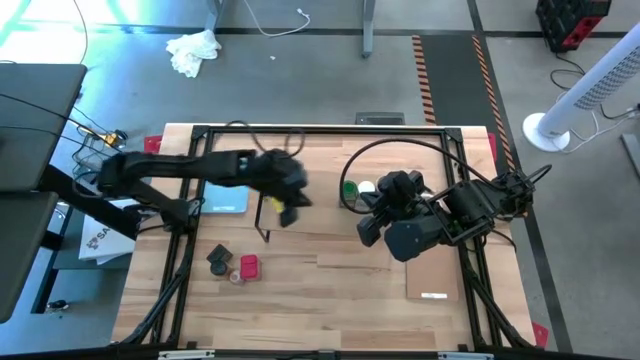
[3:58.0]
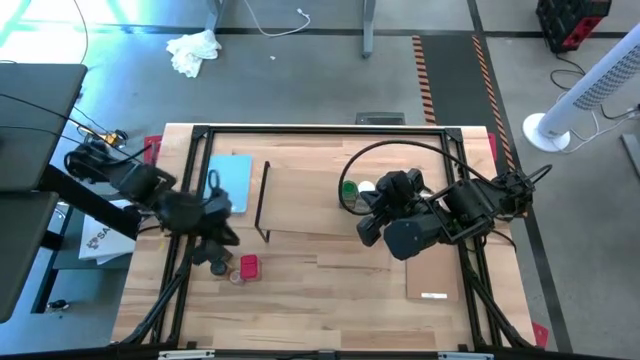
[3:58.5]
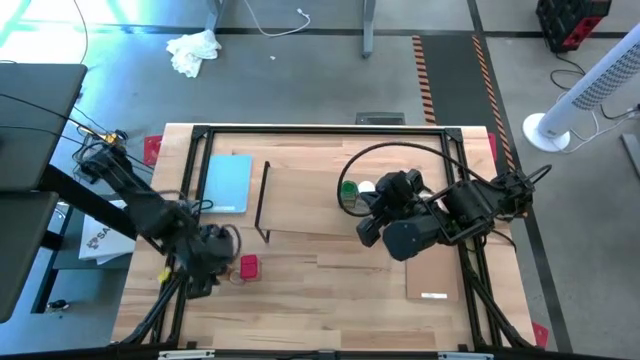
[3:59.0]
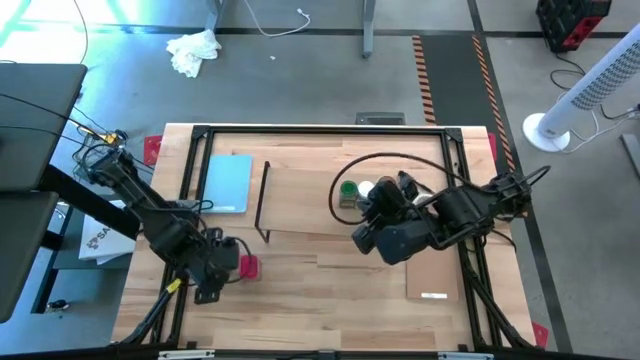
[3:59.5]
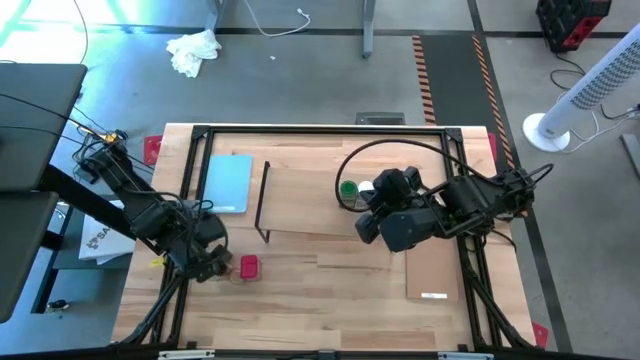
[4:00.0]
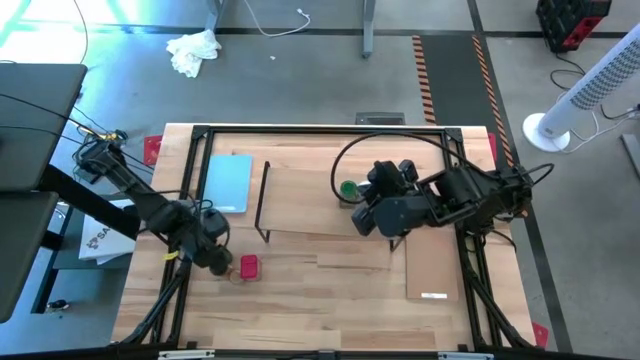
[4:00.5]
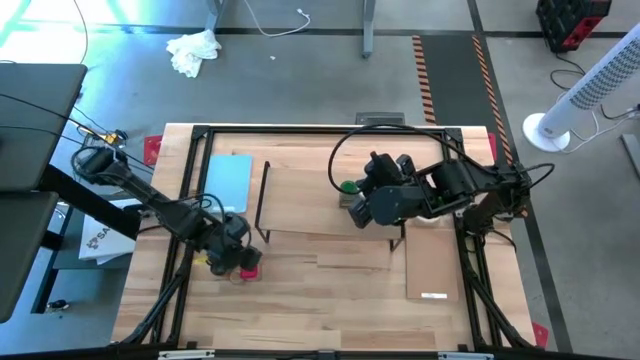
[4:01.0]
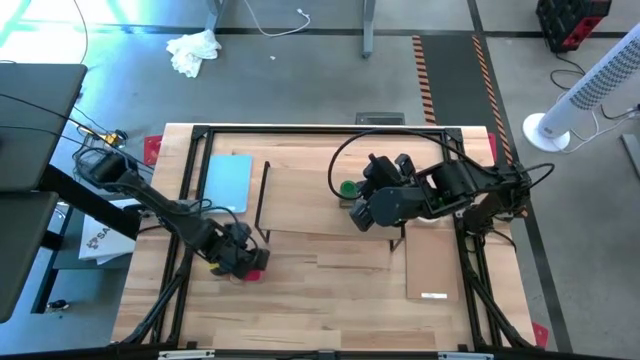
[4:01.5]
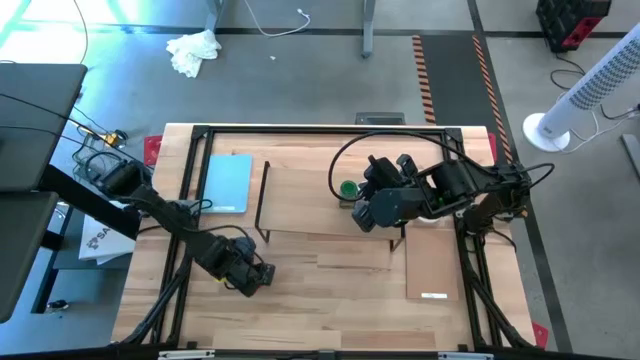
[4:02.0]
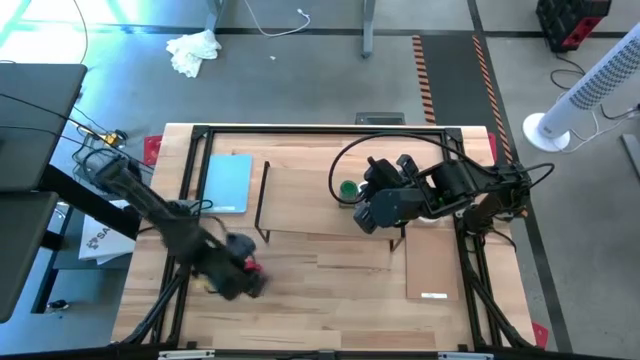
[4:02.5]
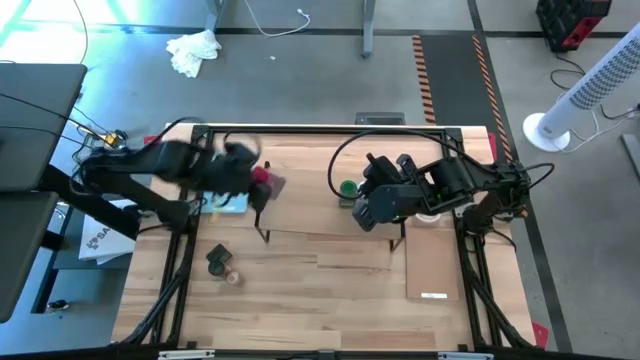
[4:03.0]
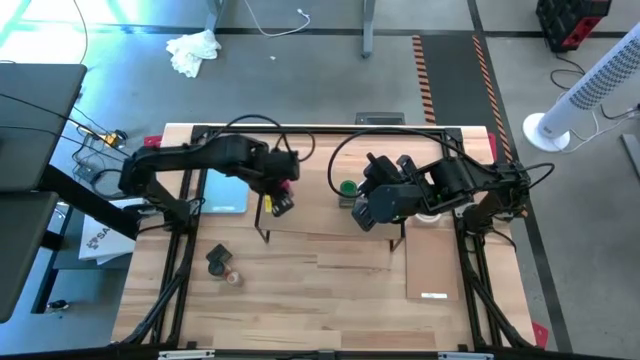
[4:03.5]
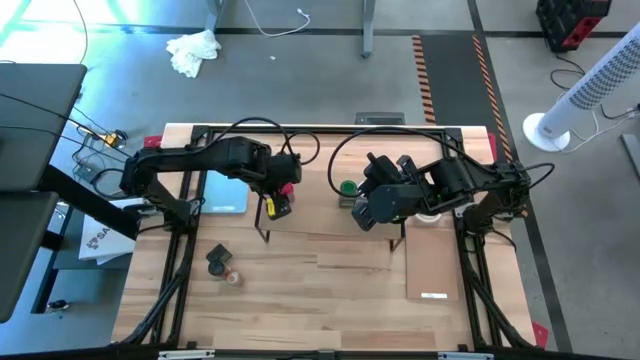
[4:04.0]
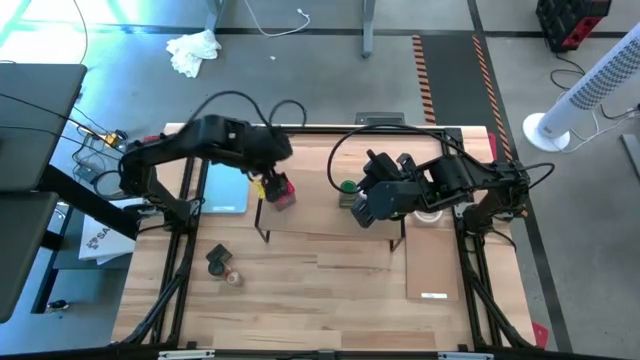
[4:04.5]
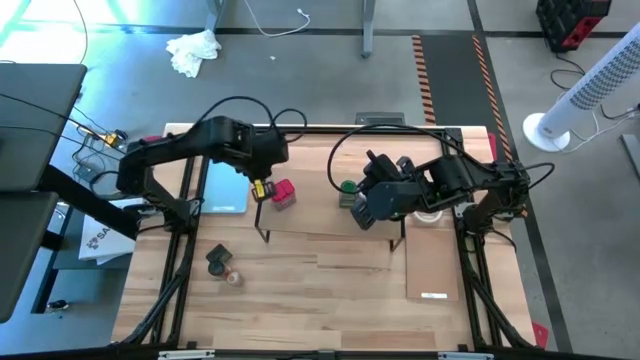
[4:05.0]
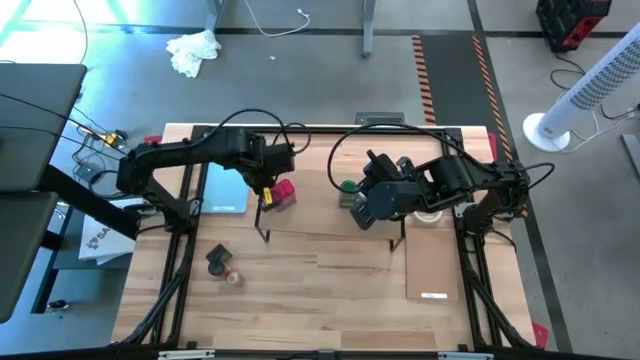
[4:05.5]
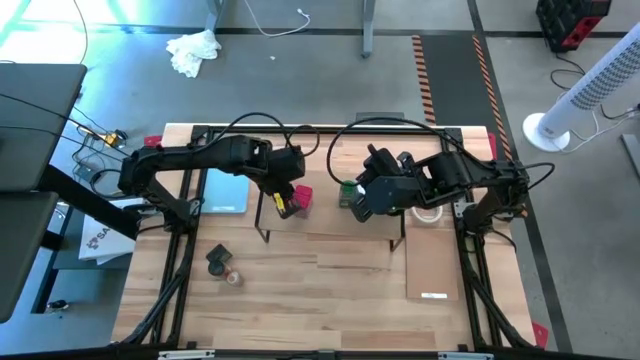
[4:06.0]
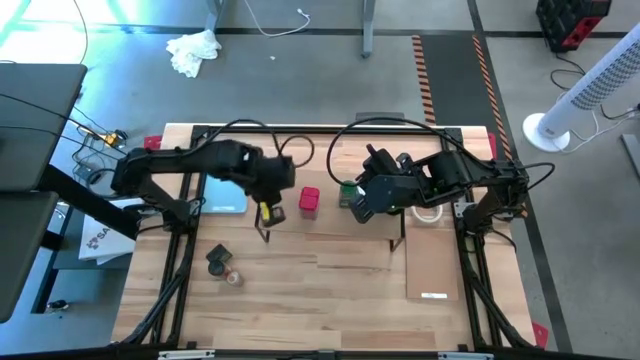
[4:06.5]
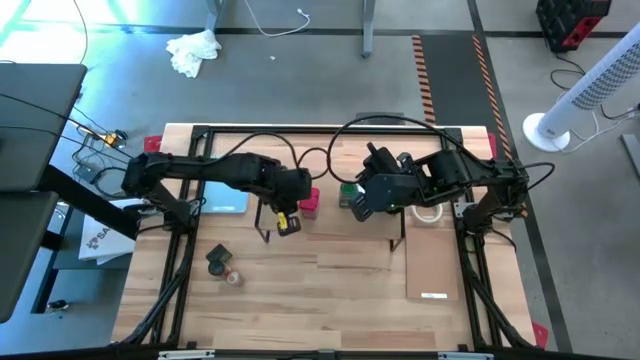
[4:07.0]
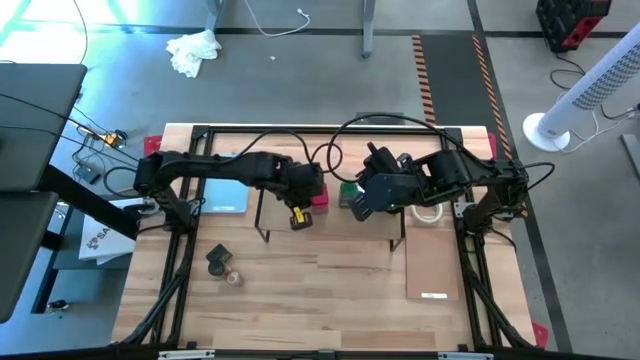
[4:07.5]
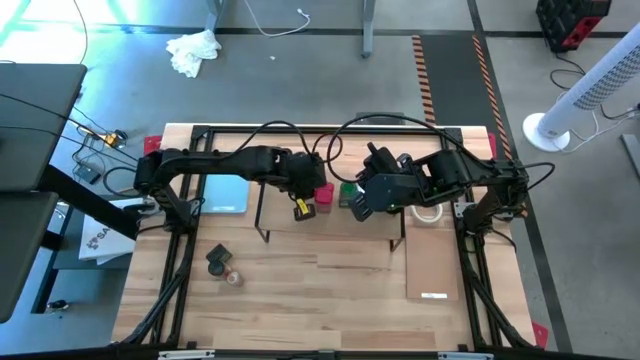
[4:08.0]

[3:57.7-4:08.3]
Task: Shelf spices
Put the red seasoning can on the shelf

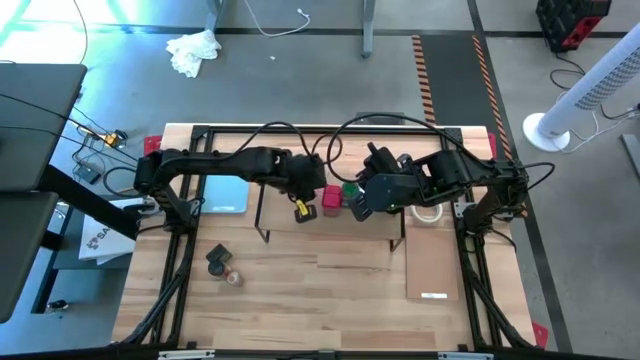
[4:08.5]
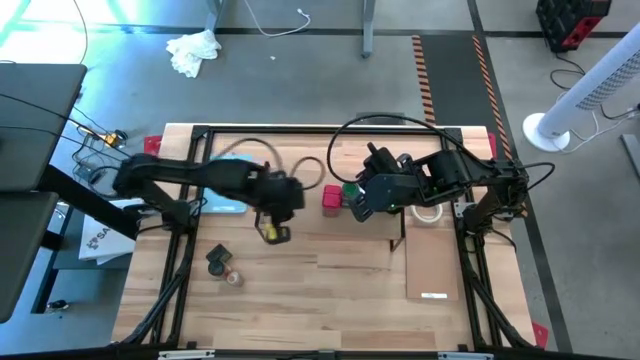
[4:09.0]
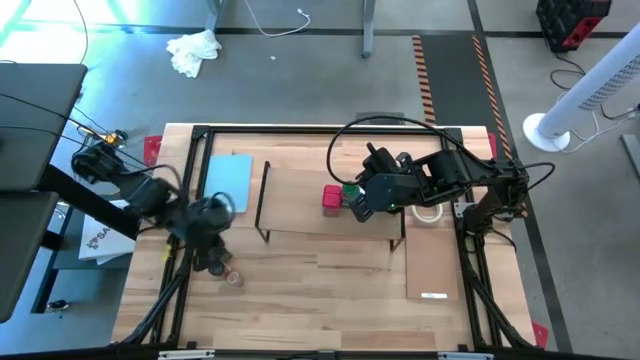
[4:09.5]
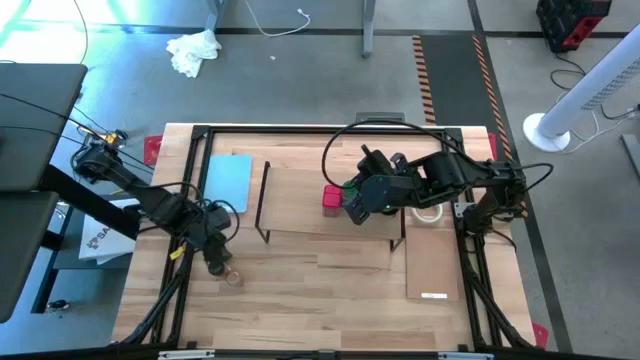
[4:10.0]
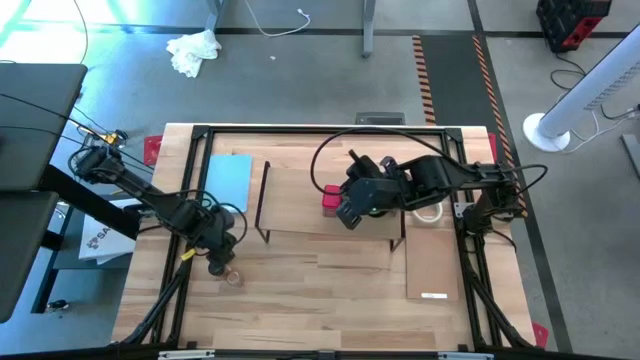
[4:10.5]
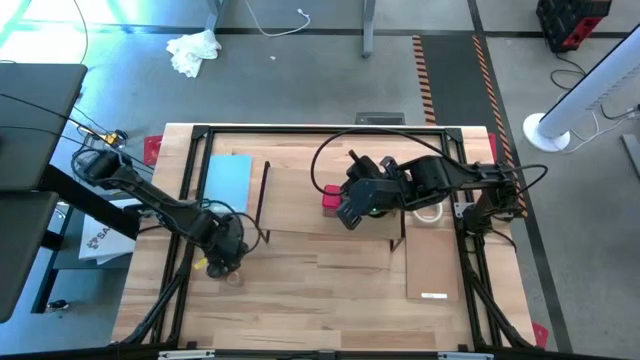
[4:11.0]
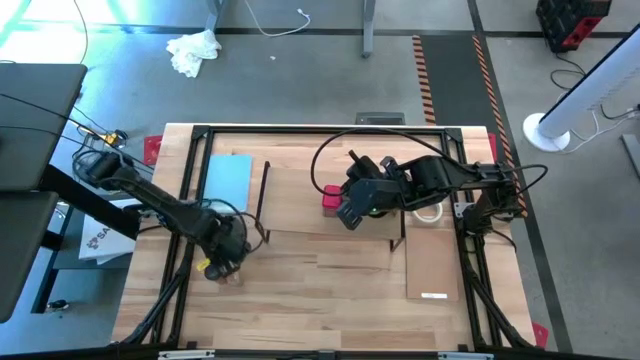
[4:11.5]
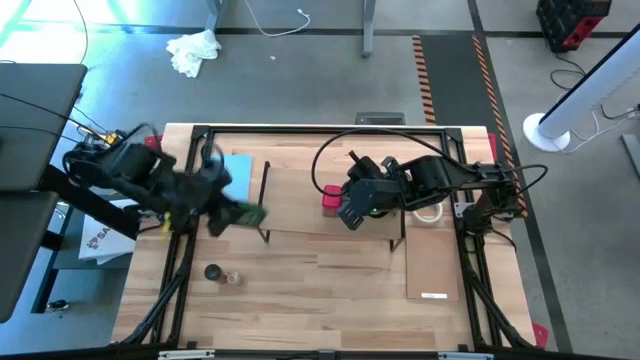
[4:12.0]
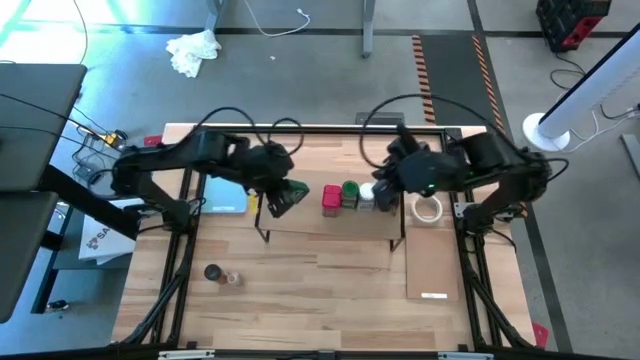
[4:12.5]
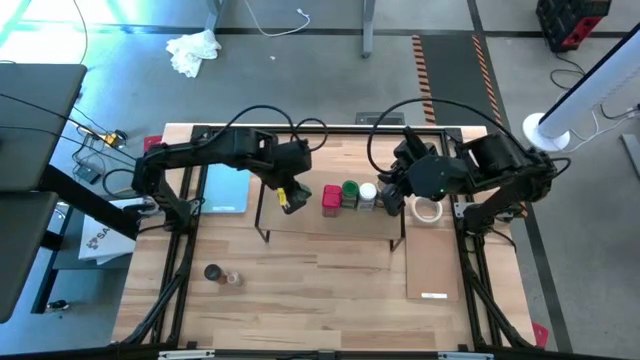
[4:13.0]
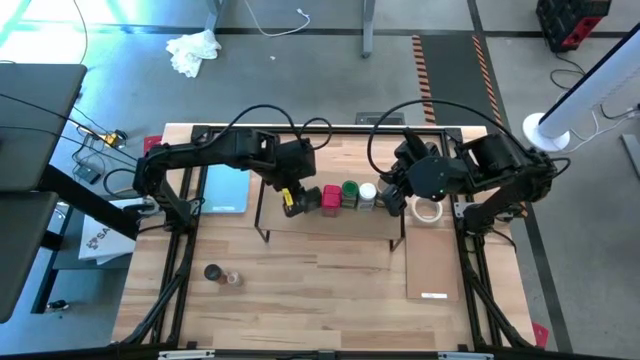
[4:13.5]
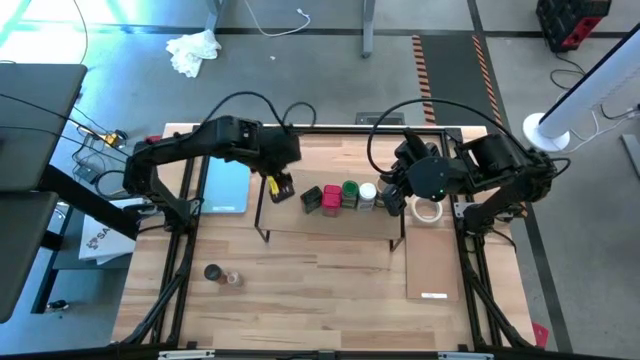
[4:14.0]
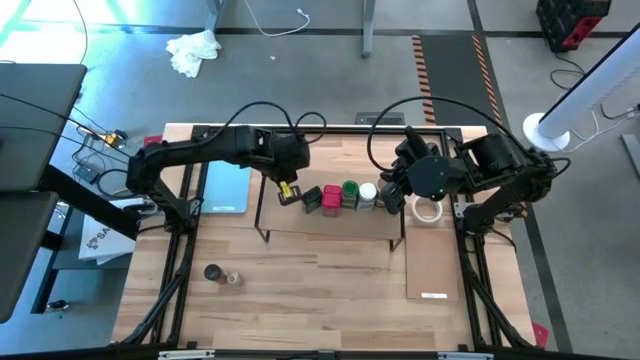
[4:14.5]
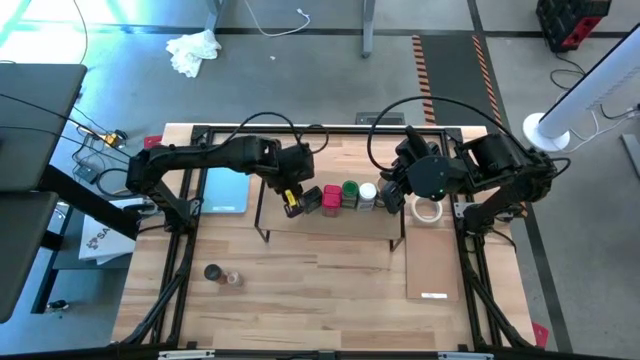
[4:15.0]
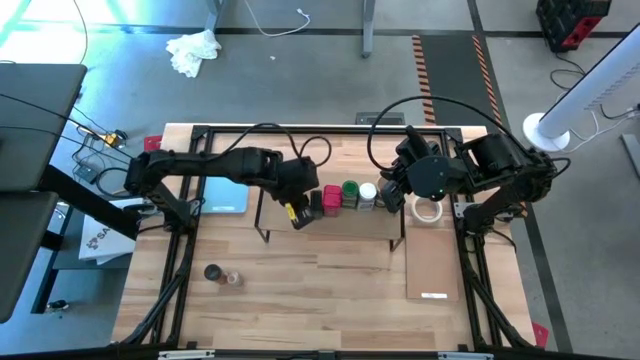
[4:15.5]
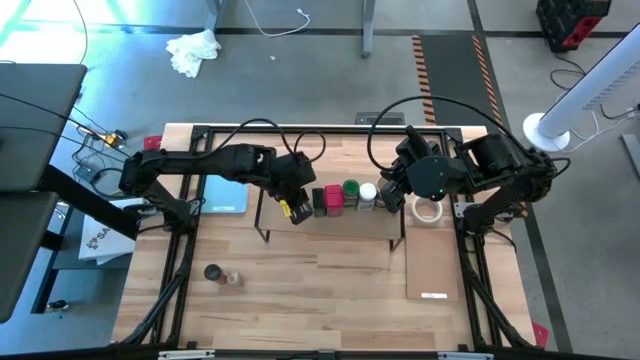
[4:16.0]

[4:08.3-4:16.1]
Put the black seasoning can on the shelf
